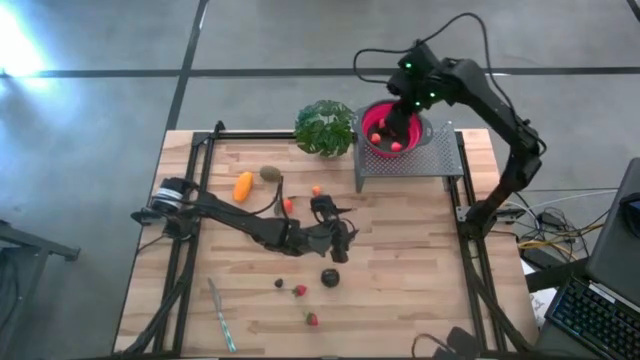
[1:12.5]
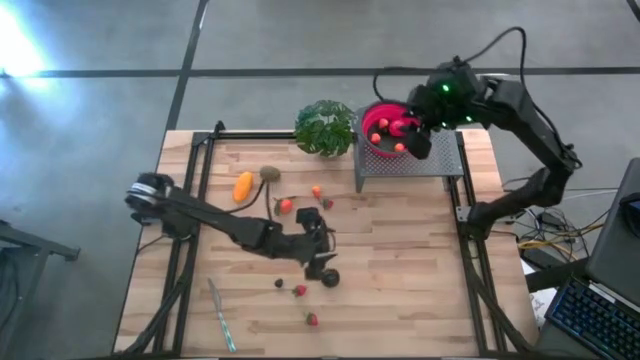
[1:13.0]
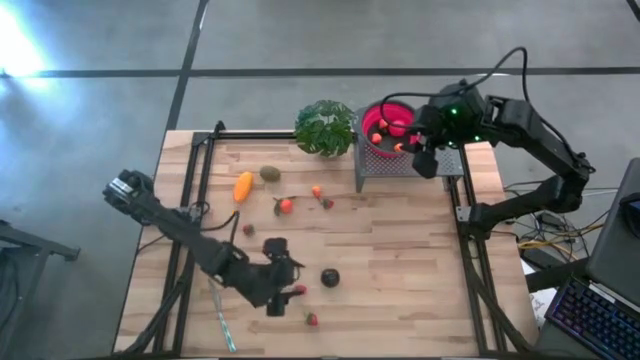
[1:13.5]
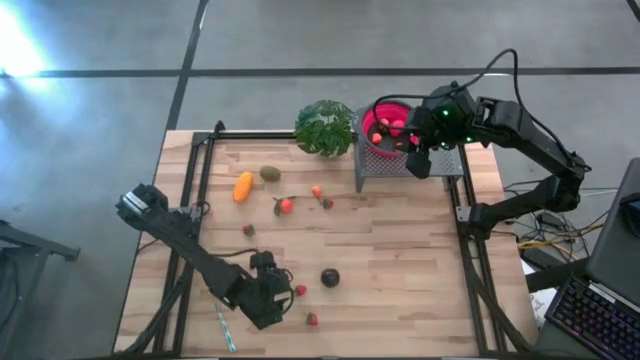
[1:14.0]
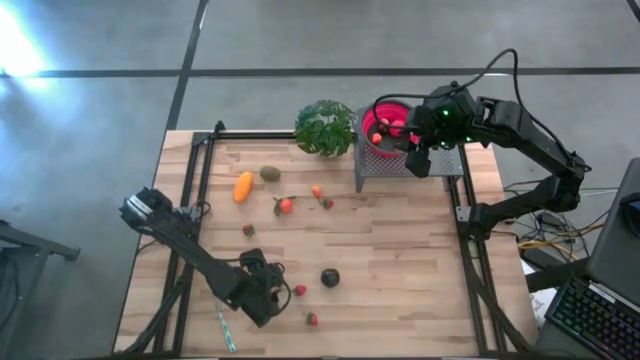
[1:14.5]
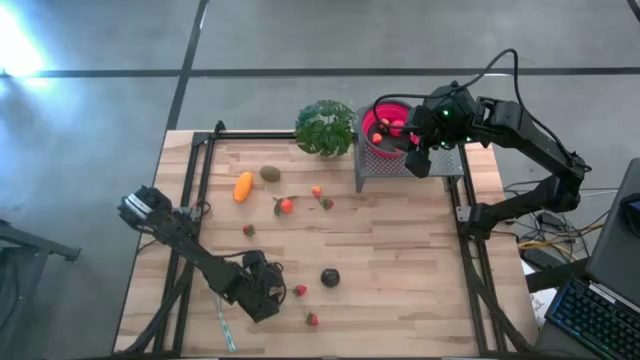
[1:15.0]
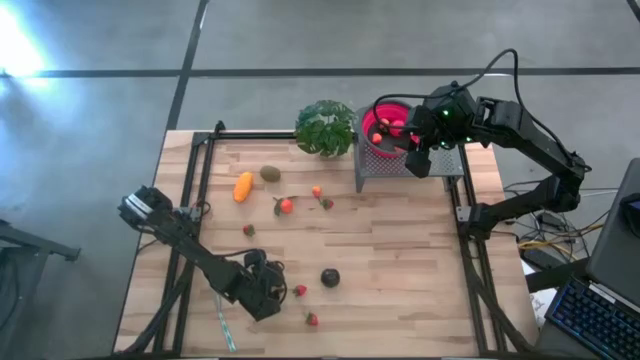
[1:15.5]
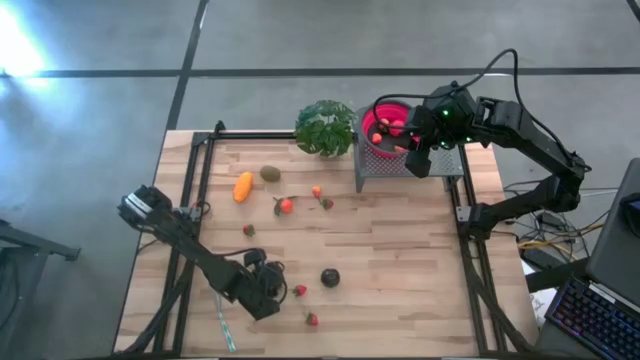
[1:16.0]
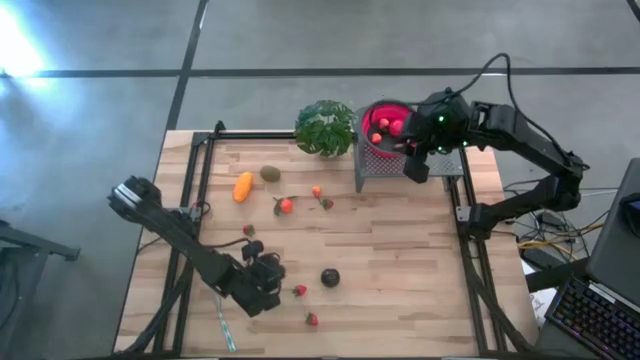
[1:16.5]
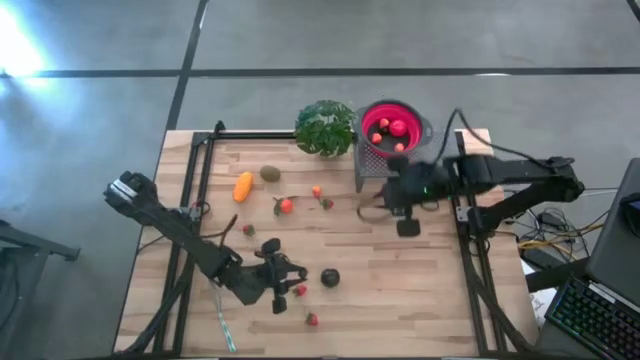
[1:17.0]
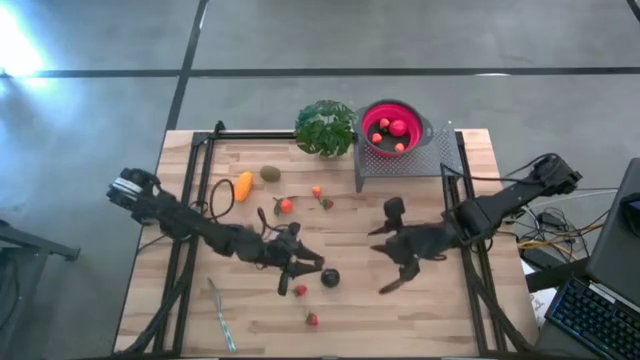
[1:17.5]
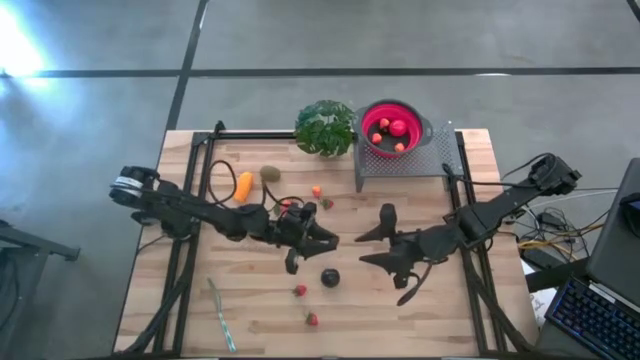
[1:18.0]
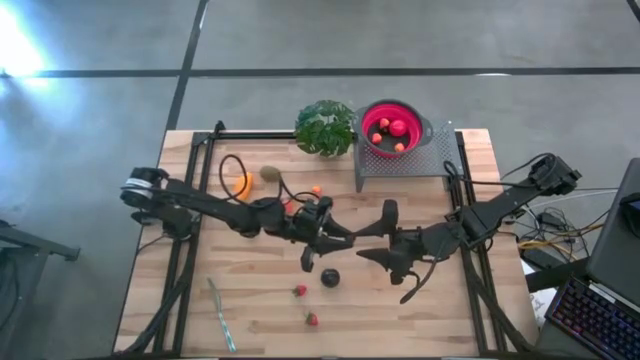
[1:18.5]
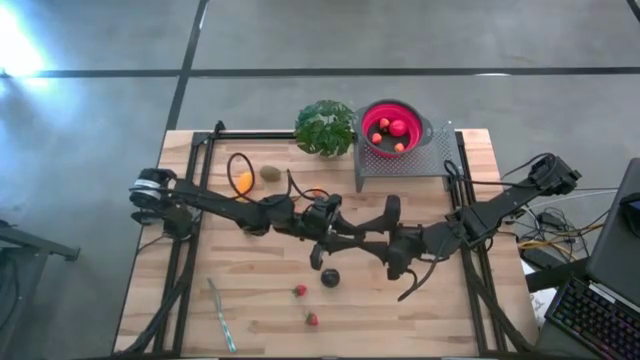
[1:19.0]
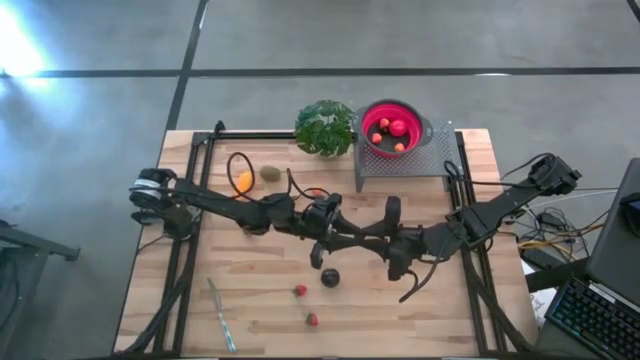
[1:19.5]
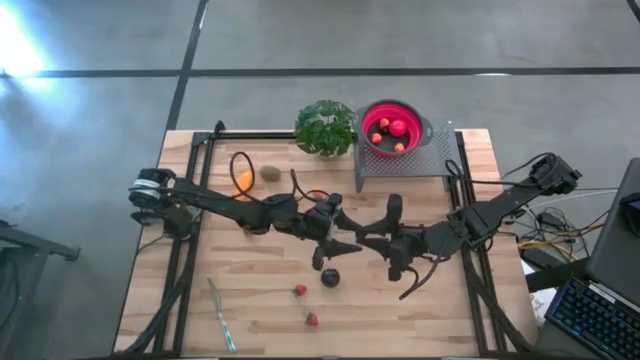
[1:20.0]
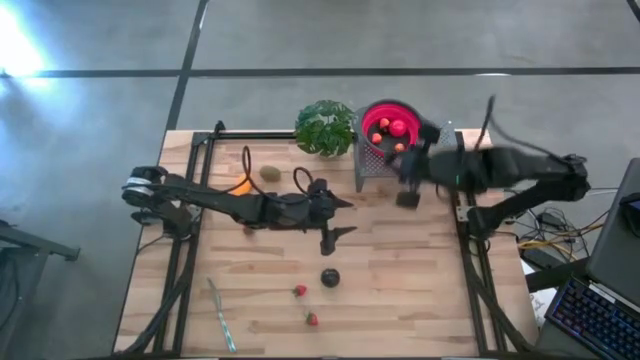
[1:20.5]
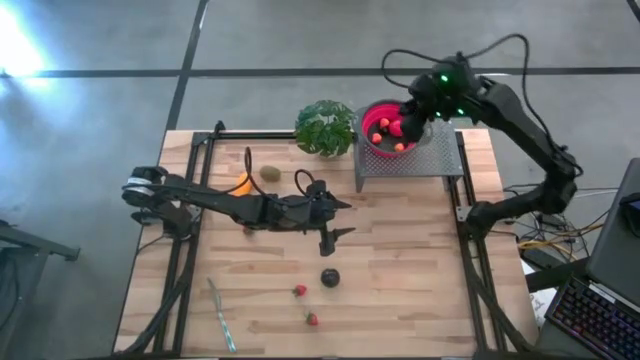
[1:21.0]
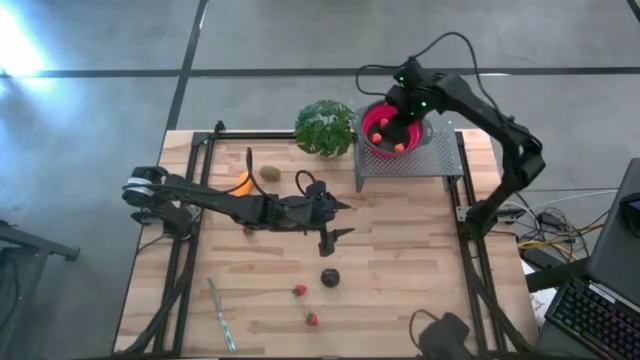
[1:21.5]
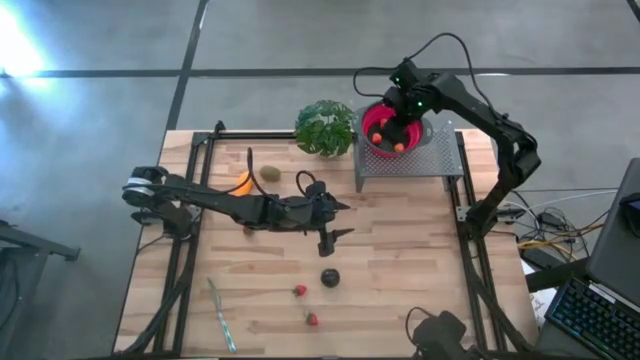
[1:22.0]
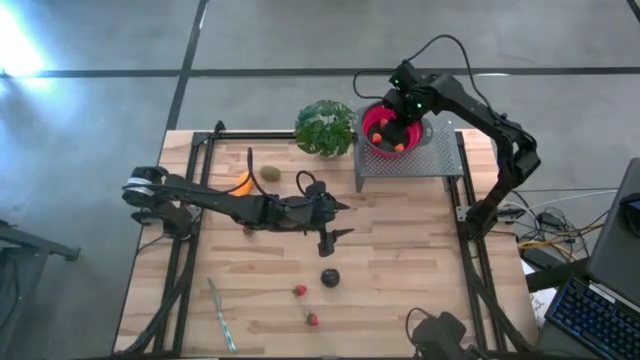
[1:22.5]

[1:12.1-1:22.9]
Task: Pick & Place Fruit
Put the blackberry into the red strainer bowl on the shelf

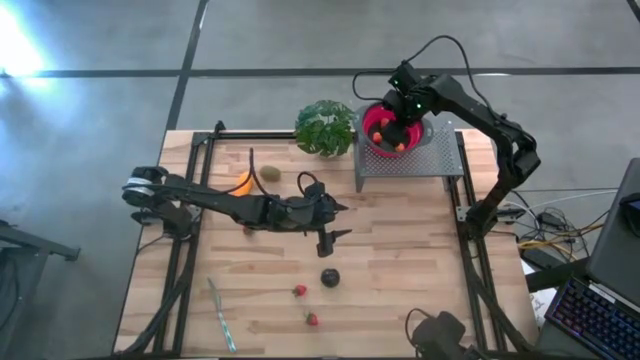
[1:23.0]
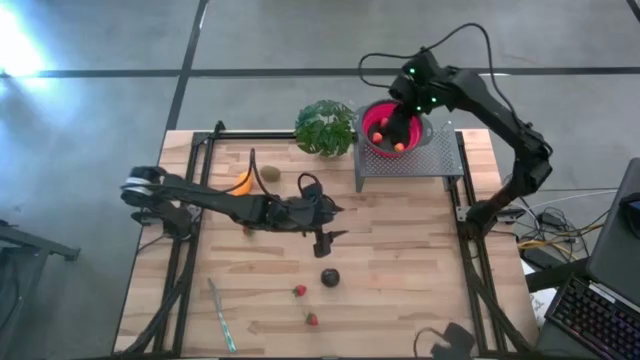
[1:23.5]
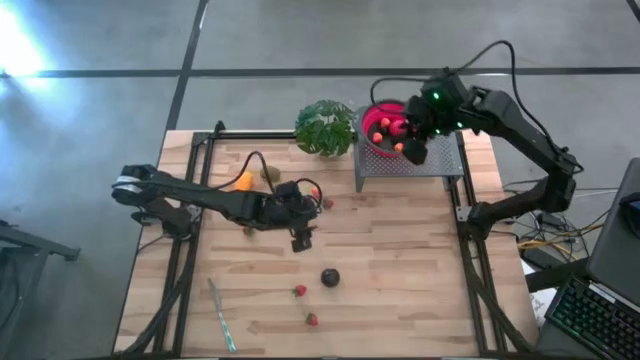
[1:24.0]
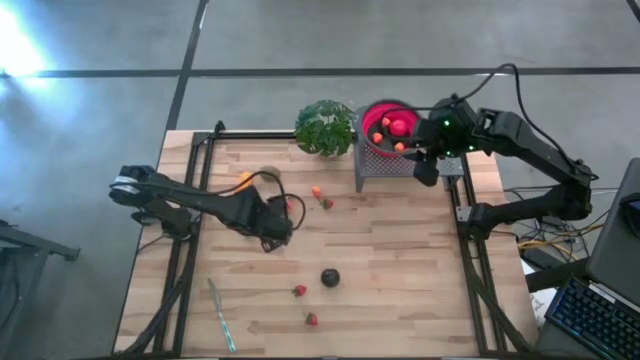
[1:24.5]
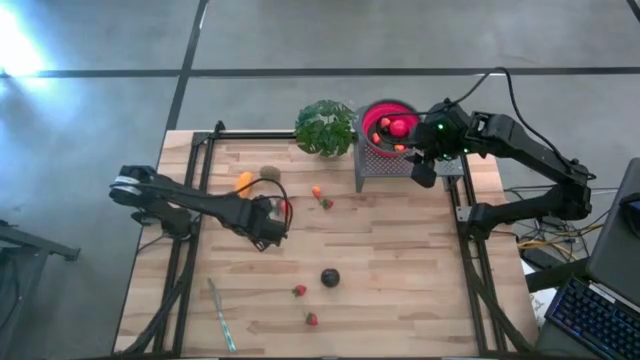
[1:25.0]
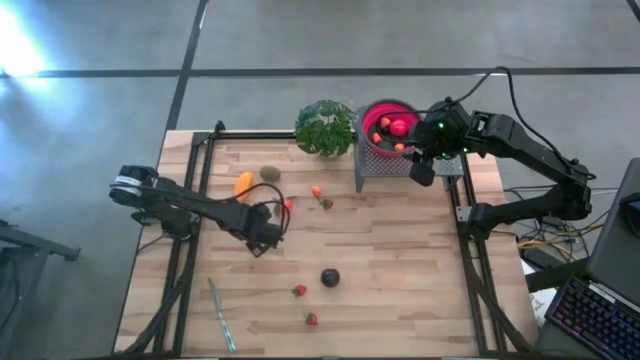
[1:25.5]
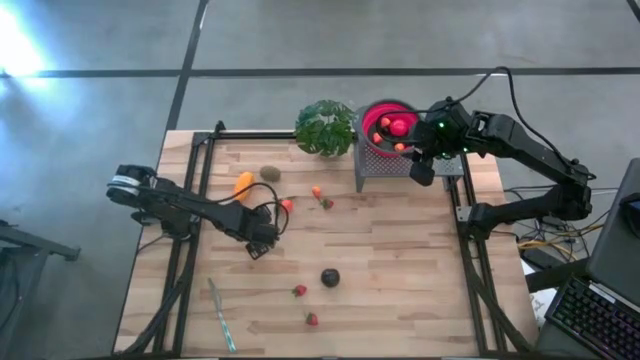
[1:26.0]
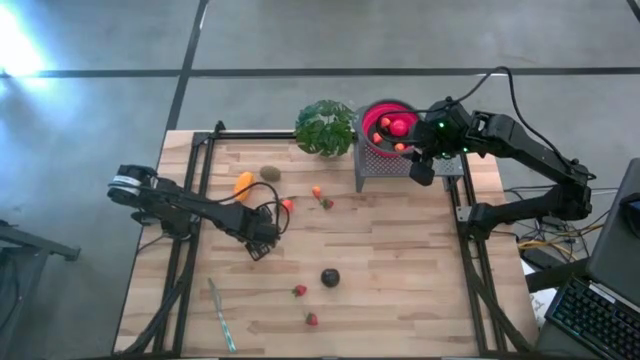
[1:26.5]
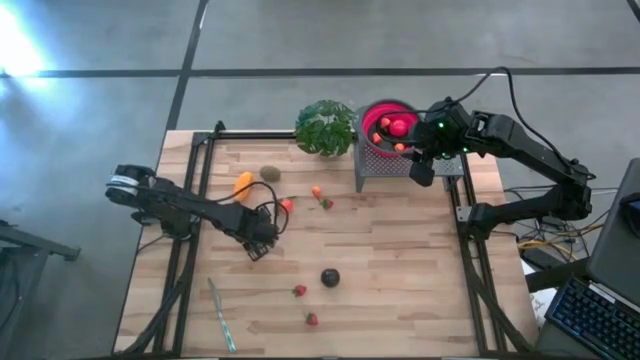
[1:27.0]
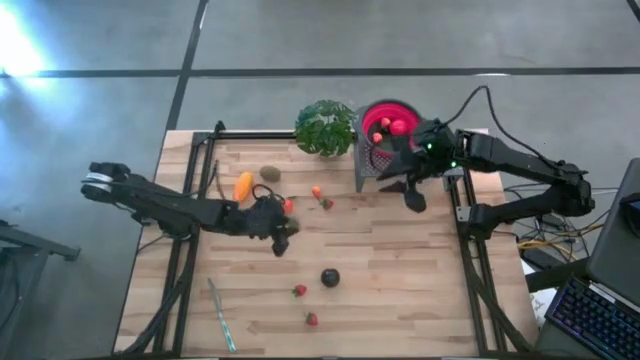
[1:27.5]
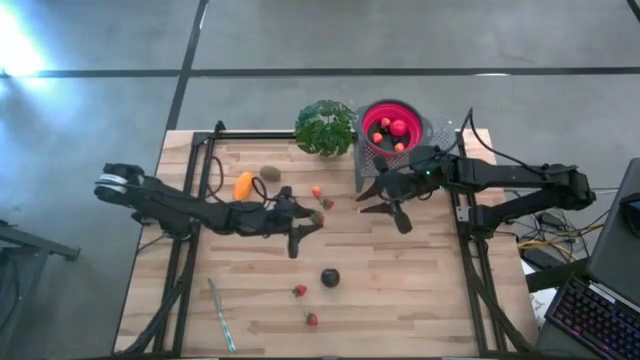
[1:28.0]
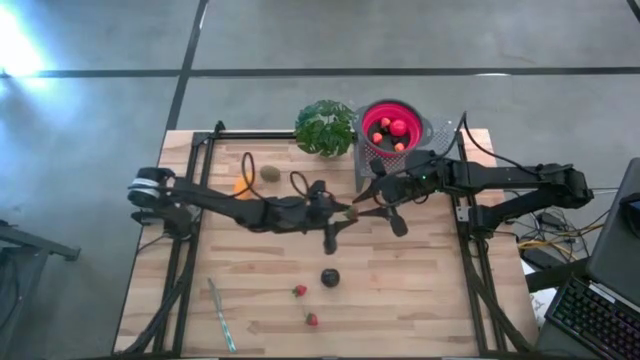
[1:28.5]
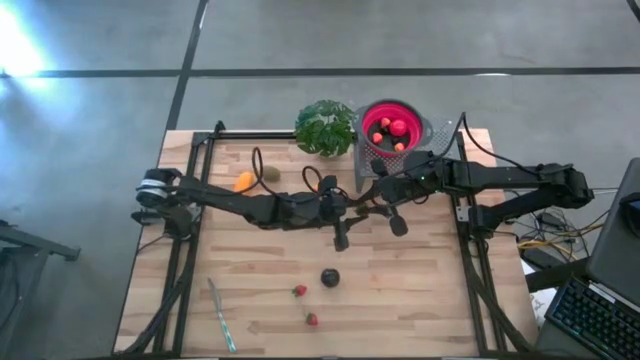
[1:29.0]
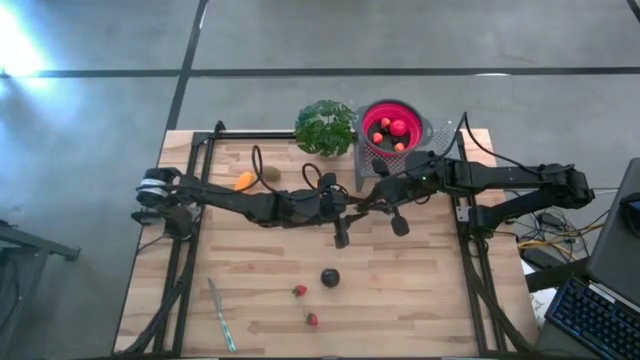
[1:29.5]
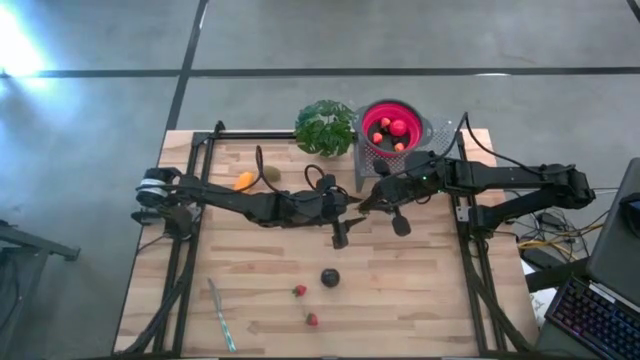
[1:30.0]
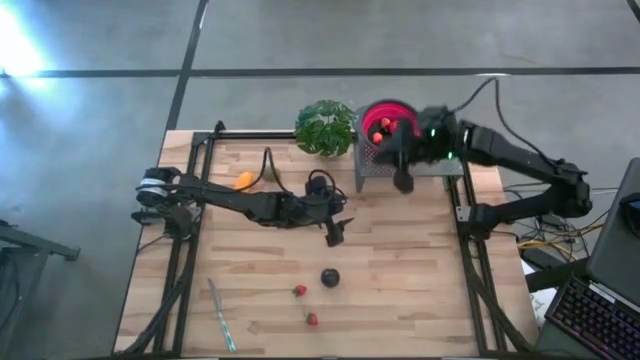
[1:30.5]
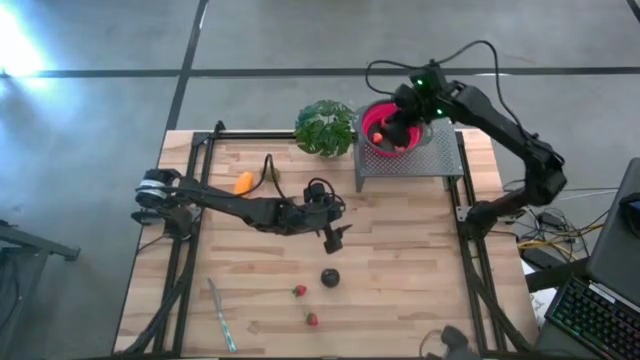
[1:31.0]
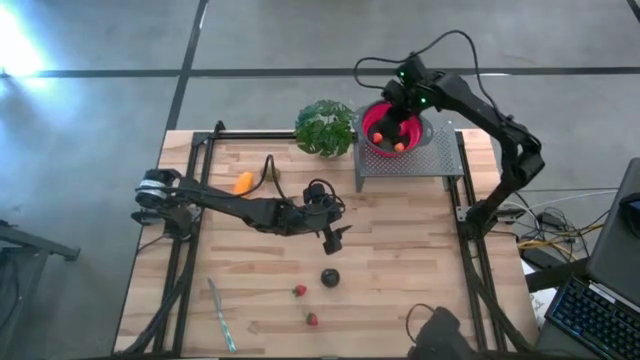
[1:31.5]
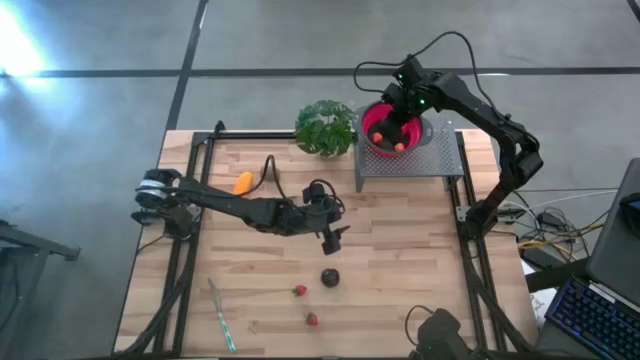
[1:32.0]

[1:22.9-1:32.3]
Put the strawberry into the red strainer bowl on the shelf

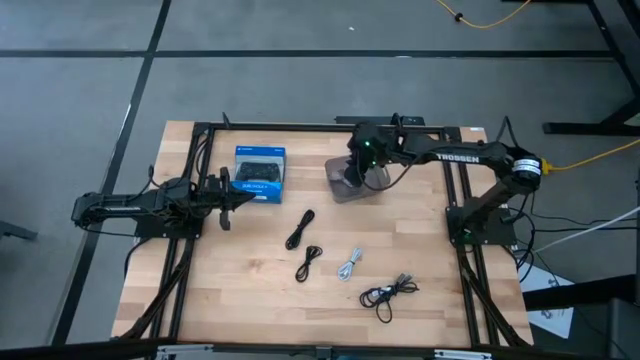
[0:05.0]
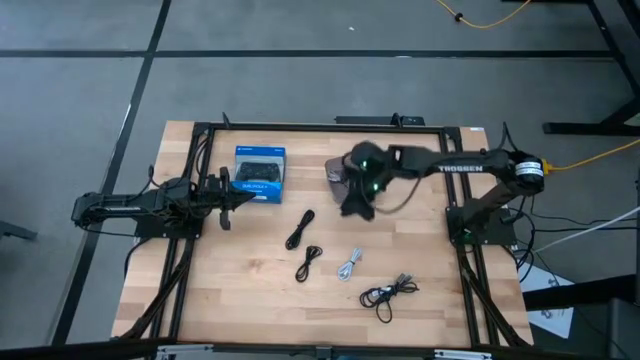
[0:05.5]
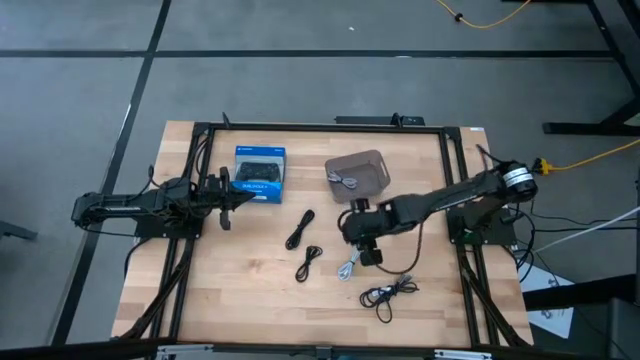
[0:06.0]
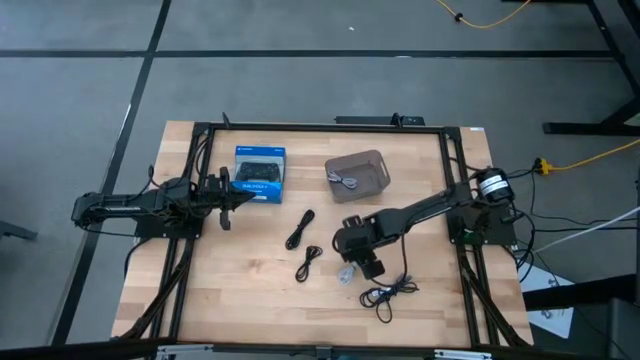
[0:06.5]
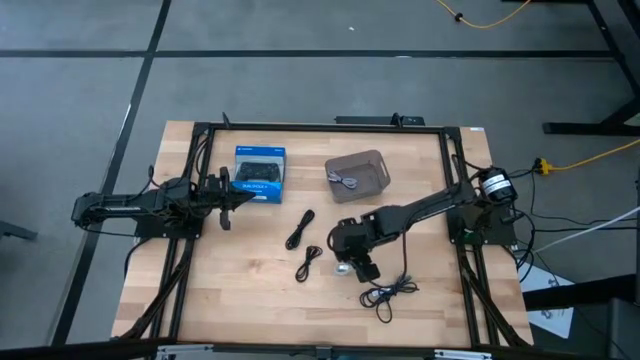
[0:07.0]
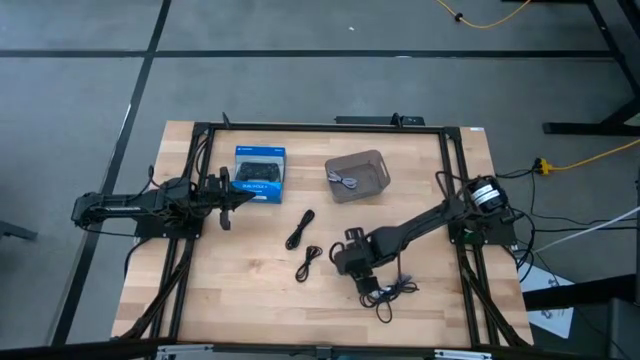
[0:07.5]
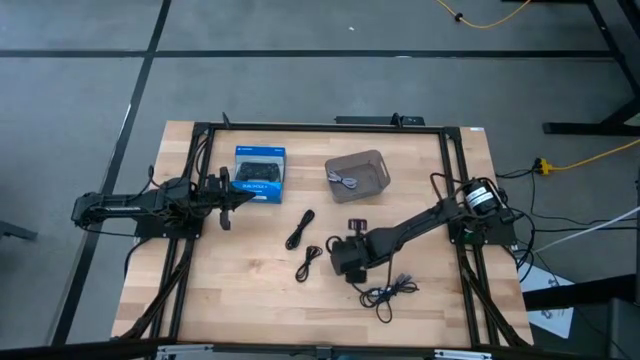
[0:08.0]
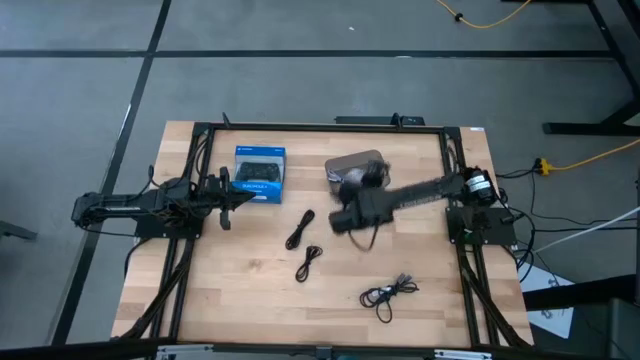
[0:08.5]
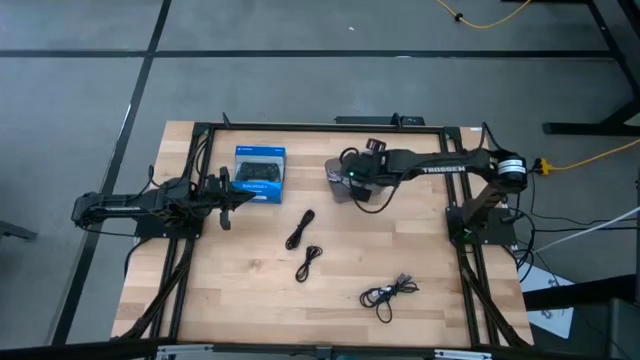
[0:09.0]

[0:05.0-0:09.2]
Task: Pick and place USB-C Cables
Put the white charger cable into the black bin
